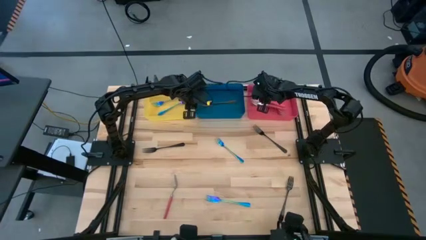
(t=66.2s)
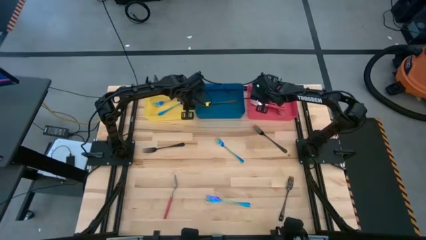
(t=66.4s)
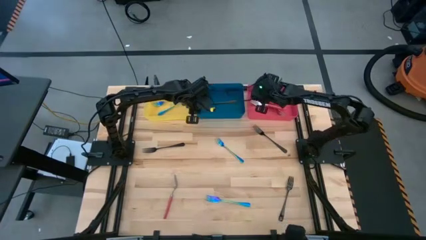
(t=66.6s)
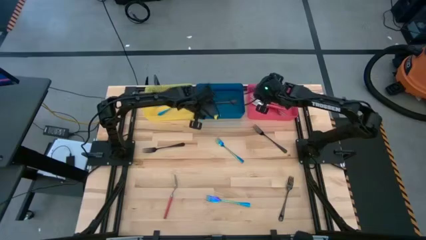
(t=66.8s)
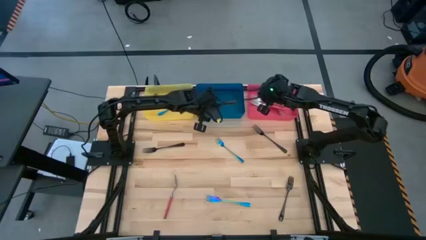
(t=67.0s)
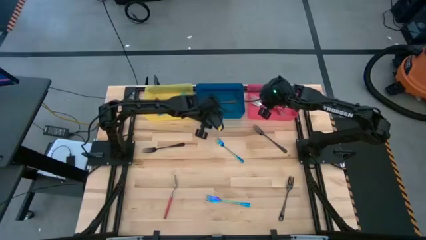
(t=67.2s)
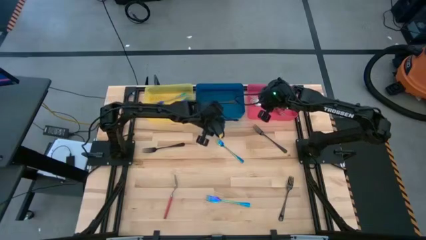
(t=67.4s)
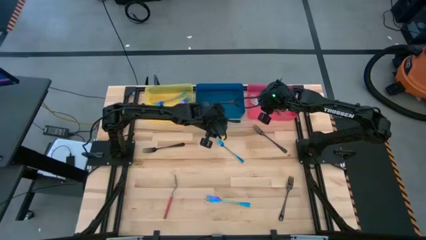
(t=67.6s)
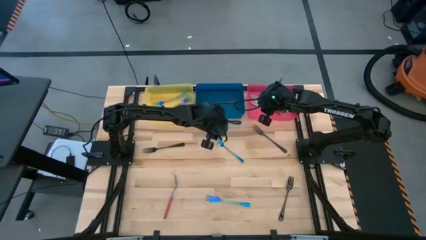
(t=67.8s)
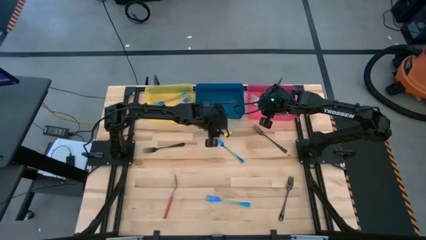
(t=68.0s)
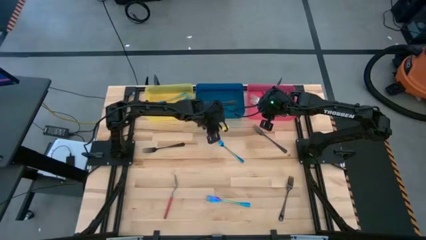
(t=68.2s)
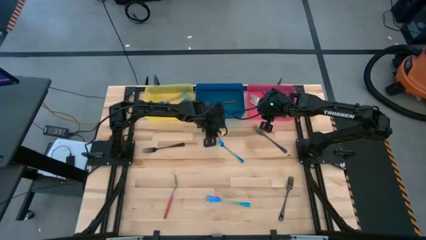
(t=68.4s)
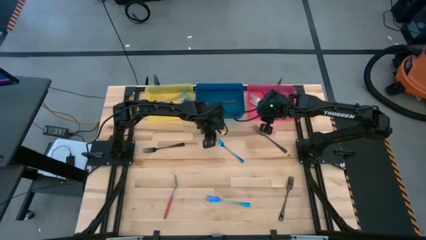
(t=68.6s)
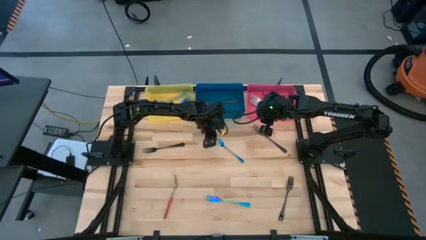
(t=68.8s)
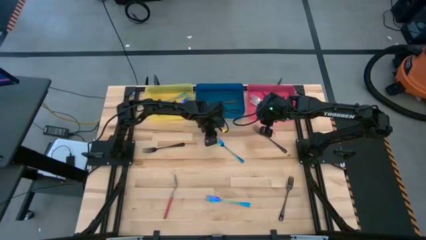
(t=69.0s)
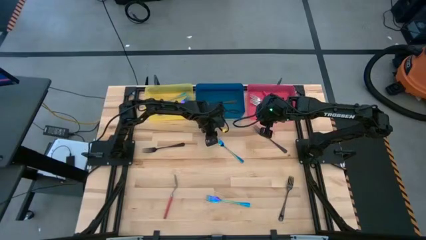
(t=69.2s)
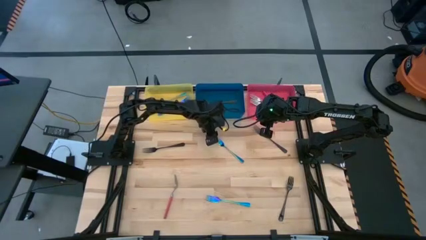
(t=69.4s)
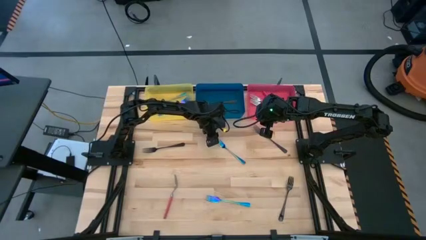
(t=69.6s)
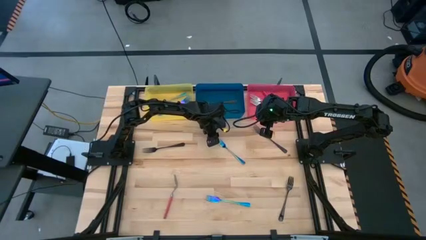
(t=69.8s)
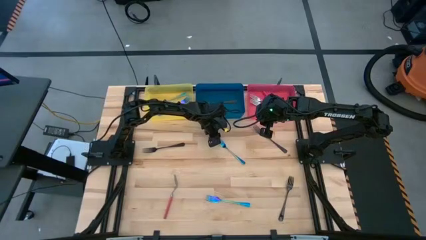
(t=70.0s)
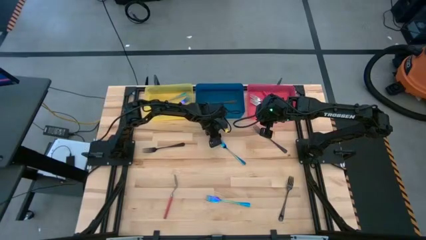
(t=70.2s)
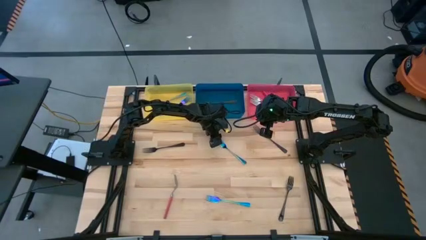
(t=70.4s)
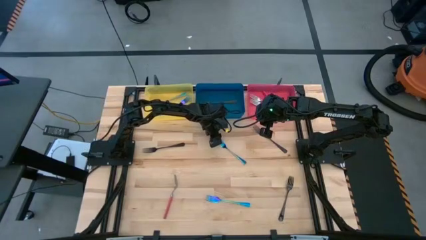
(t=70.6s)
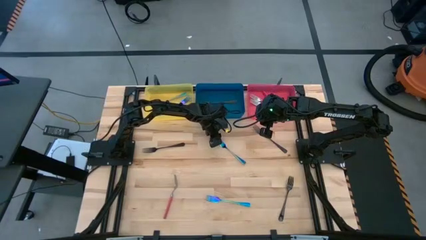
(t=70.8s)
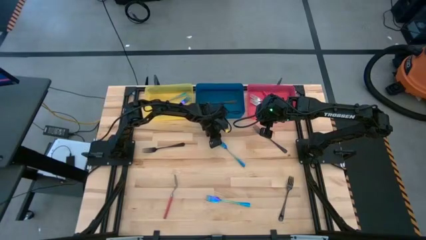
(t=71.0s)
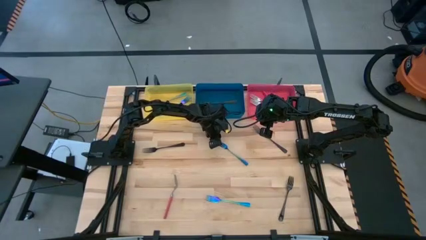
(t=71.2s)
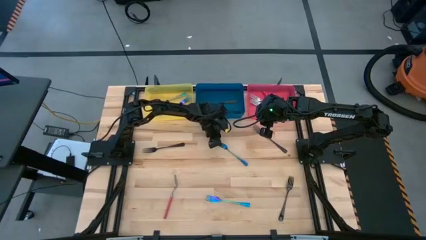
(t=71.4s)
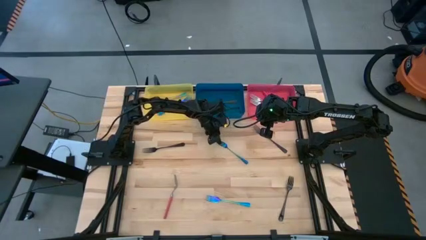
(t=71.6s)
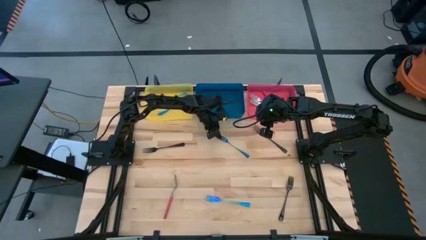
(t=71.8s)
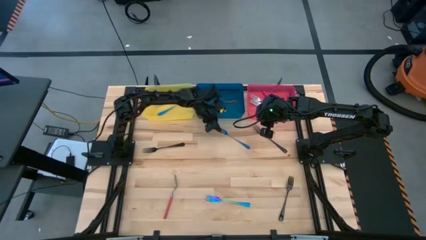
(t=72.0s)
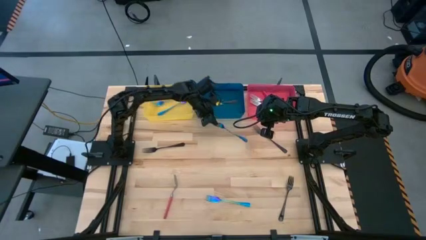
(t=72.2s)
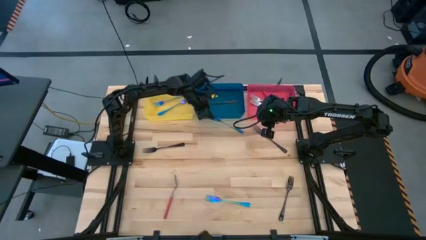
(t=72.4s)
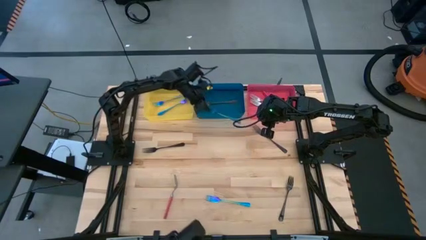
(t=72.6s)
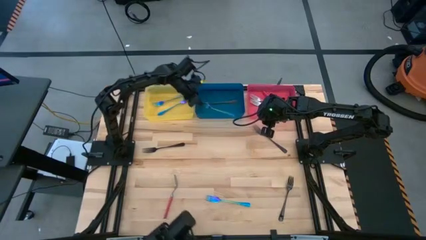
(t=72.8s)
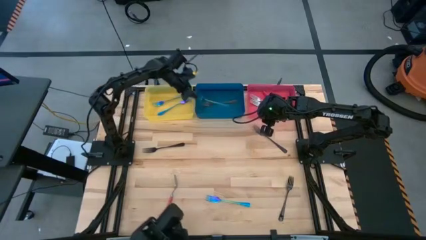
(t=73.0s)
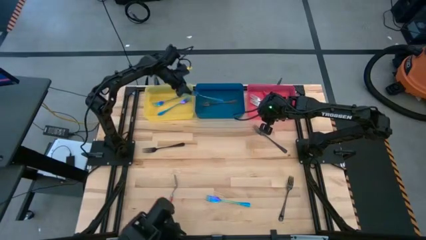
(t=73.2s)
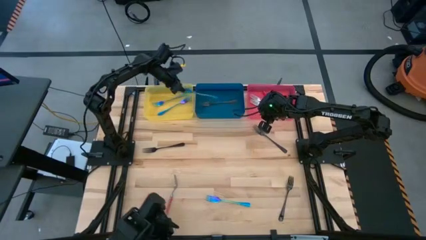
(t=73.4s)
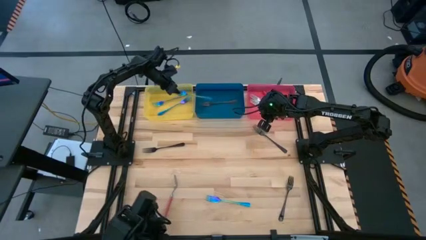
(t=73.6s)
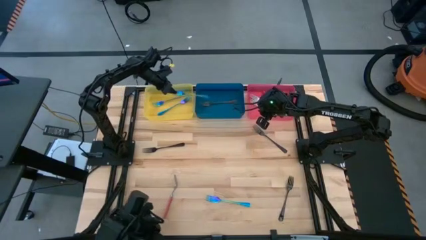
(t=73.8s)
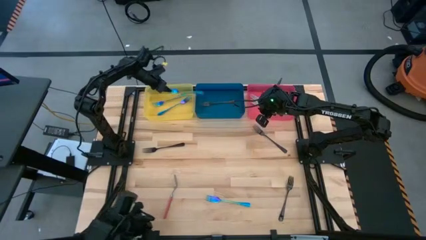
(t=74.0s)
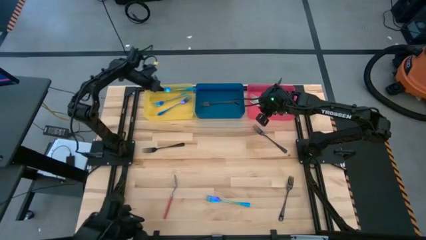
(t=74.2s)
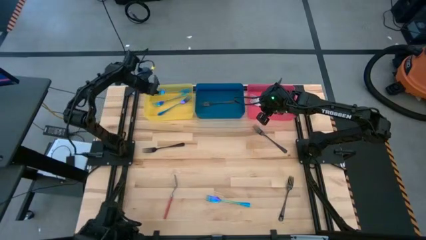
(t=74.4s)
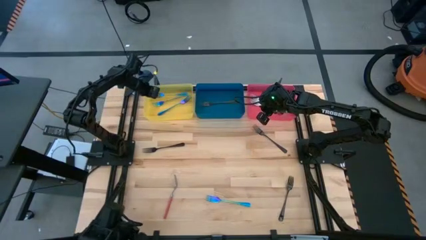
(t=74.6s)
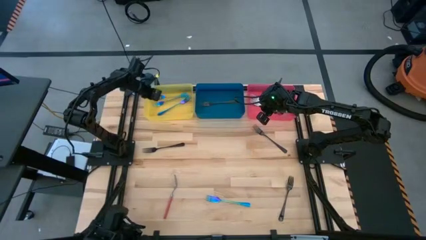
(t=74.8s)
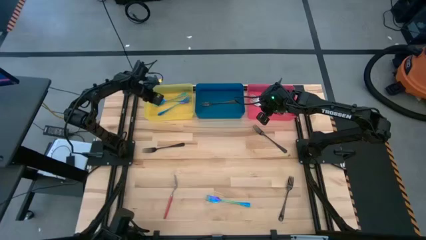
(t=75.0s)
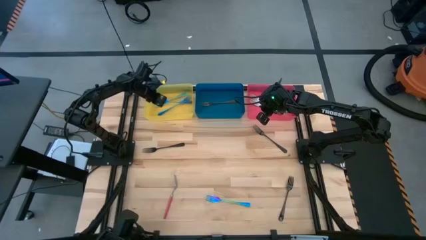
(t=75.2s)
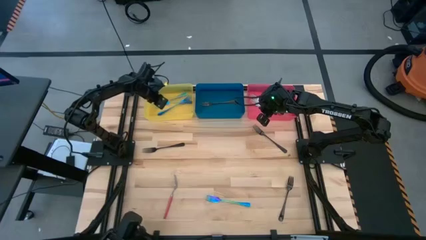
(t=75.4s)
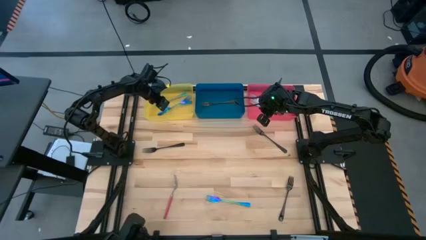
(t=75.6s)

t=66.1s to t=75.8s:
Task: Sort silverware by color (type)
Put the iridescent fork into the yellow bin

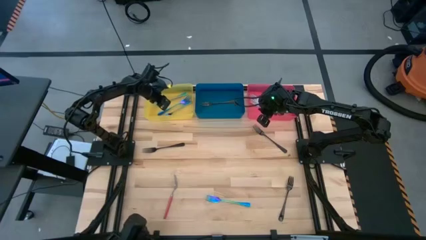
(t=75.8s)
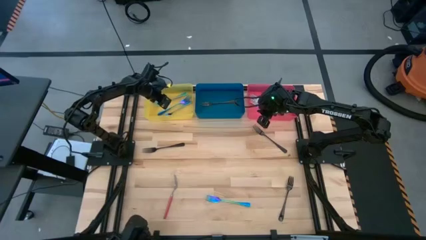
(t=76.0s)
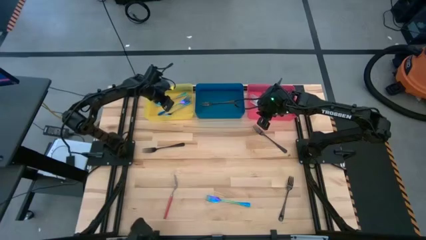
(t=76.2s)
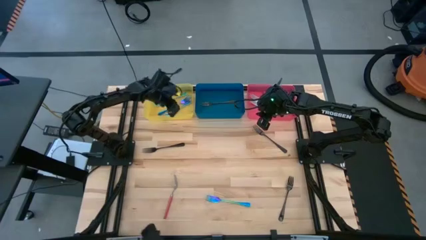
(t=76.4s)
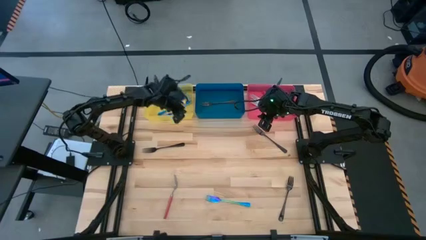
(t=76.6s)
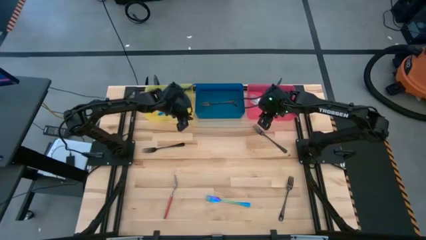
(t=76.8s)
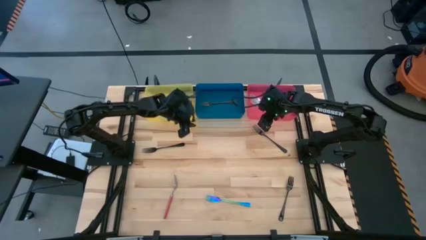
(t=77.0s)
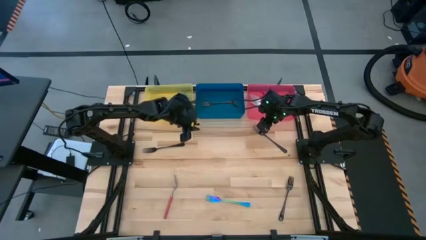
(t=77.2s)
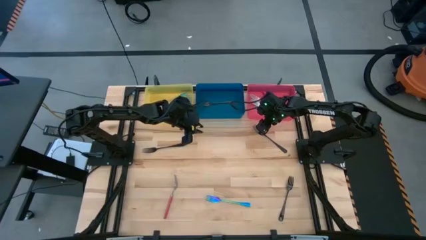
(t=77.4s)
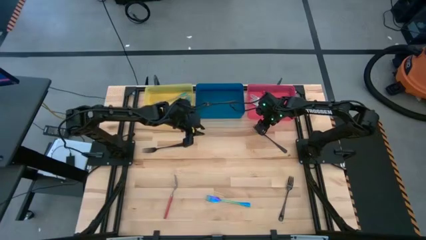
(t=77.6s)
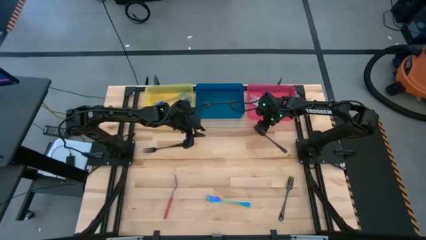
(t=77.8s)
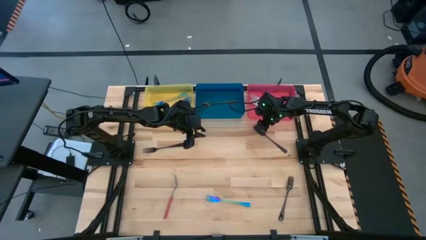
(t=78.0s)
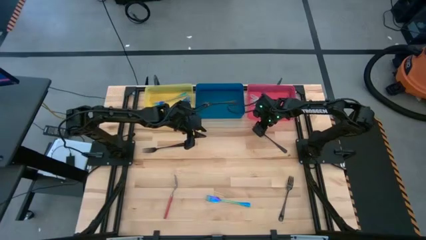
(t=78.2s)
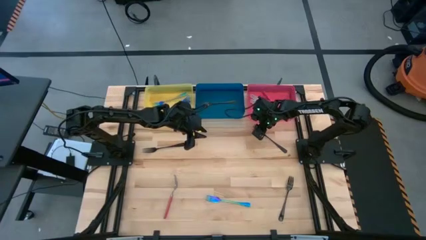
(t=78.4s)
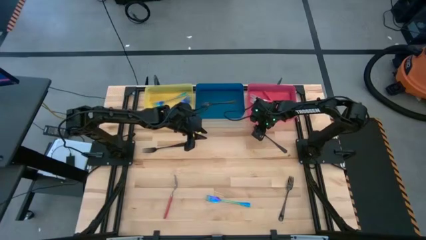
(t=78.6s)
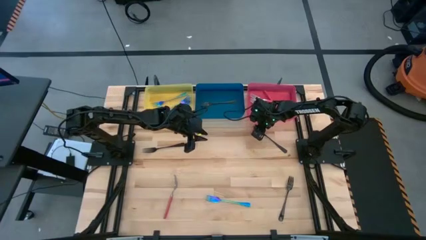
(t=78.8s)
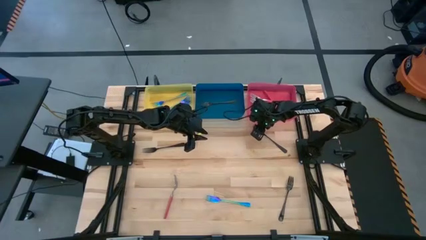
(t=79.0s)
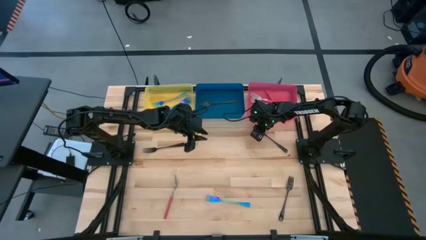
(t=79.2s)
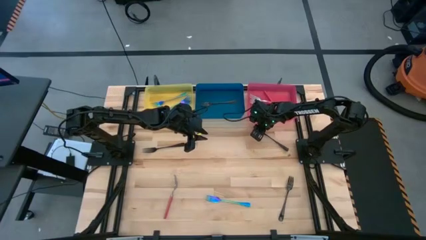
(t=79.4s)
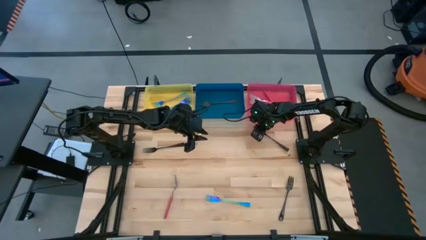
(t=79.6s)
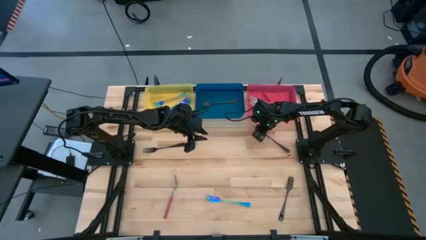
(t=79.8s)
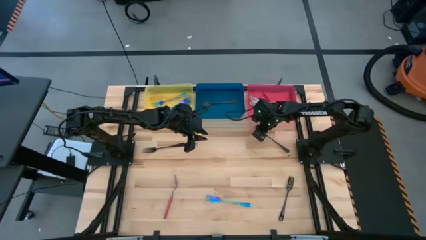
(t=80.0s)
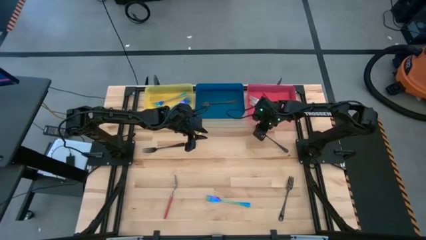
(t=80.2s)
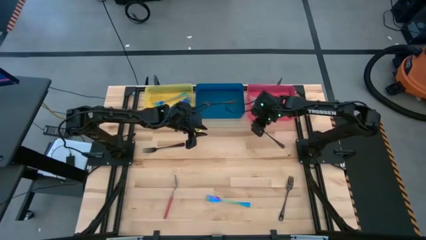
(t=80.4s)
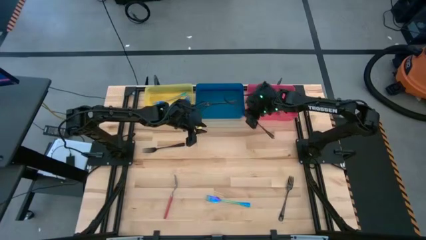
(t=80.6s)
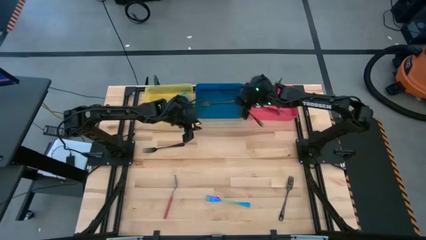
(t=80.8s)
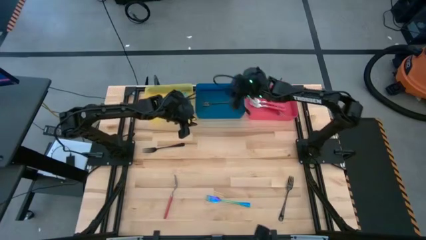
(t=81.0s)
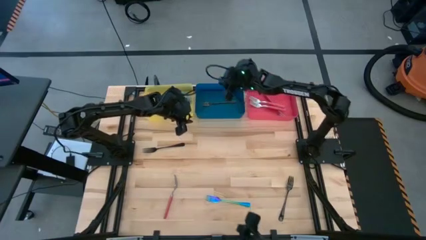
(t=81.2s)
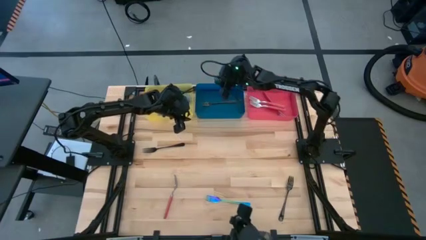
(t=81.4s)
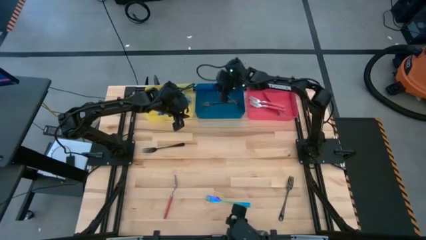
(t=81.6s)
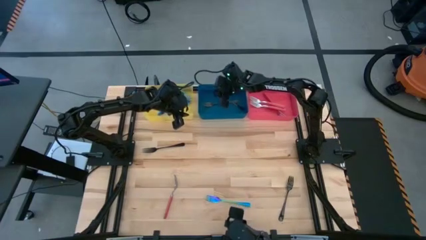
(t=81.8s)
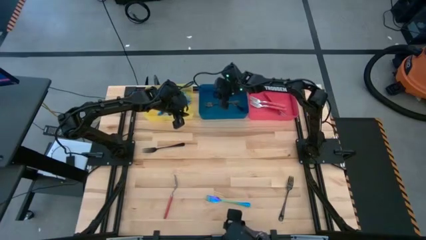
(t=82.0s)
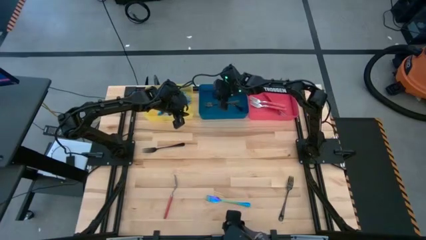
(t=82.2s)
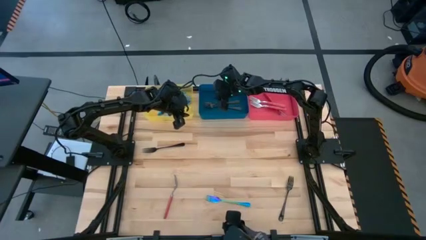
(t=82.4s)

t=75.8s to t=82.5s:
Put the black fork into the blue bin
